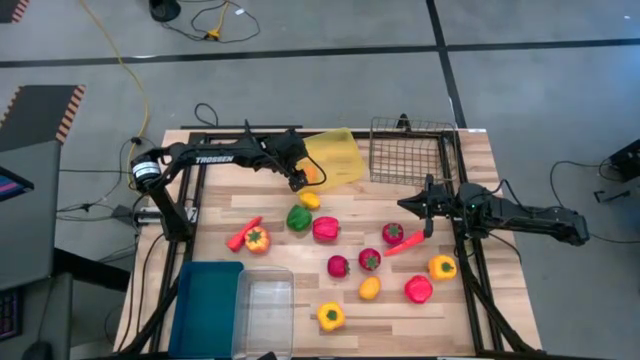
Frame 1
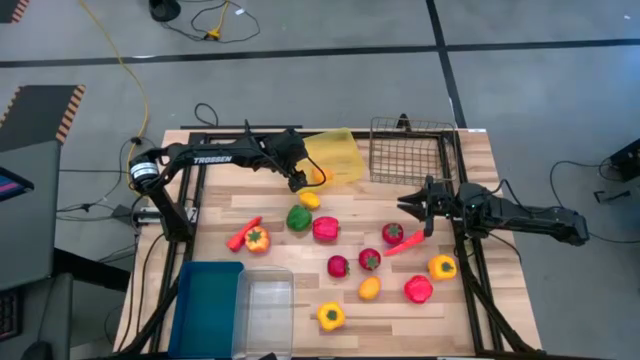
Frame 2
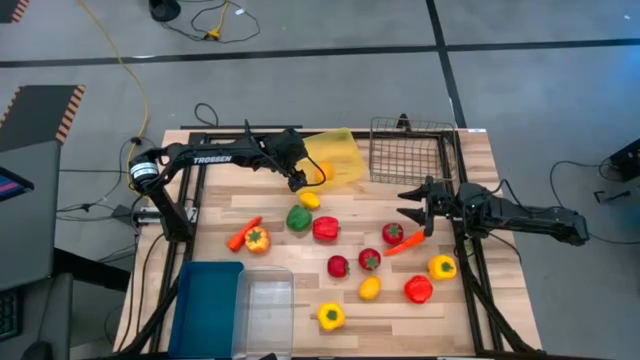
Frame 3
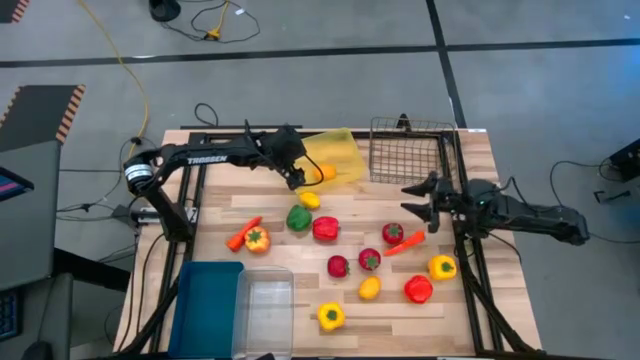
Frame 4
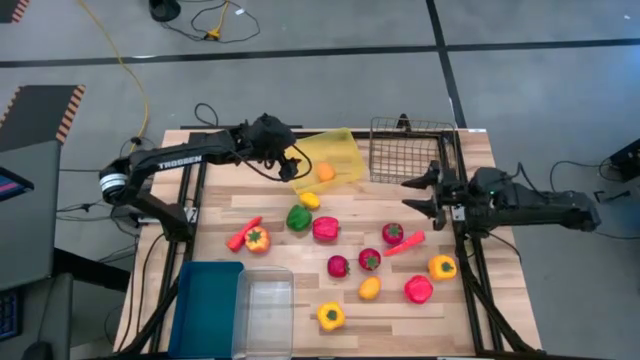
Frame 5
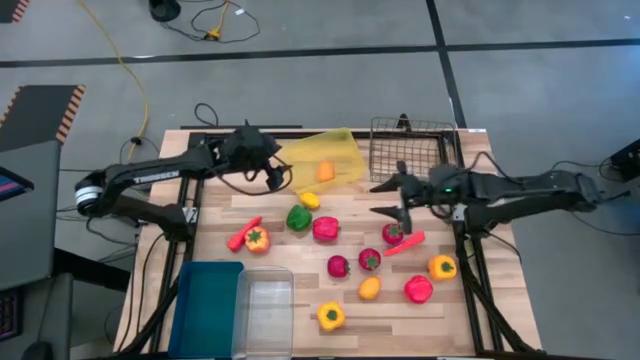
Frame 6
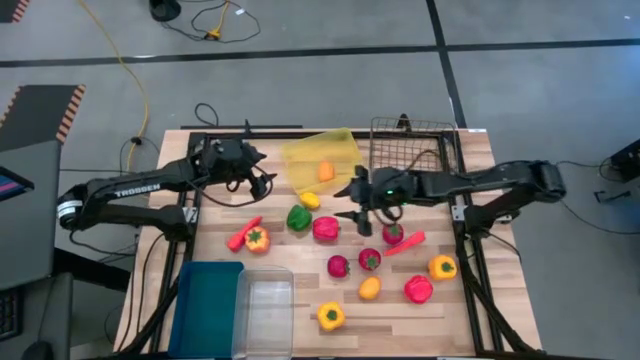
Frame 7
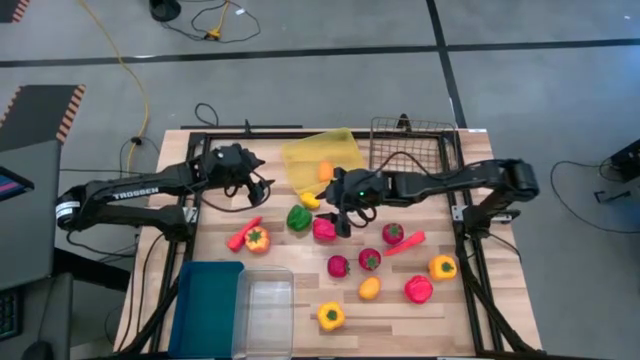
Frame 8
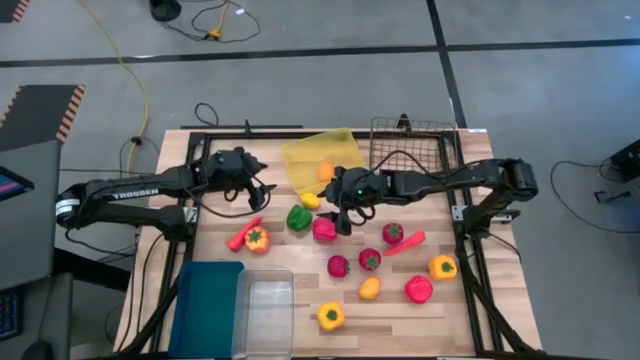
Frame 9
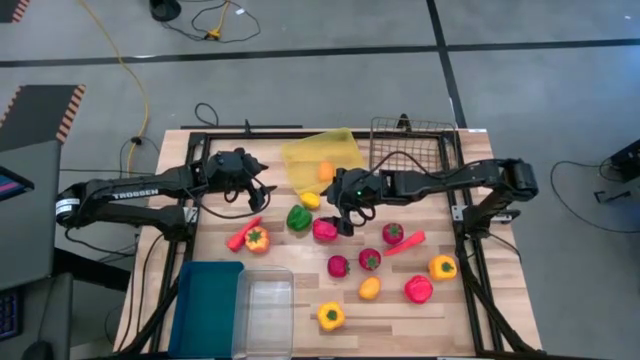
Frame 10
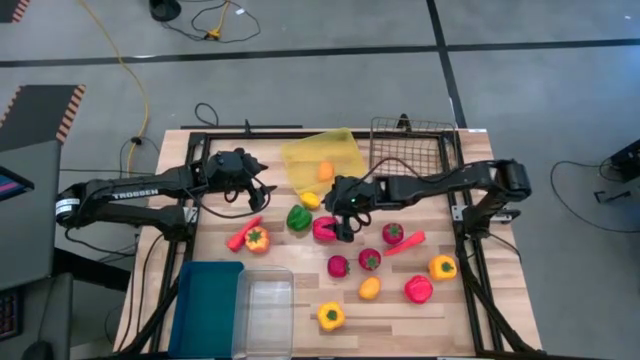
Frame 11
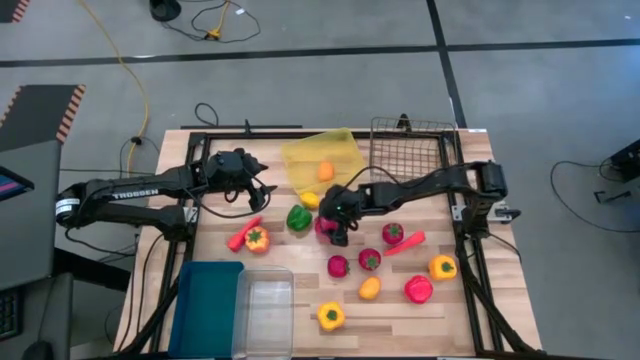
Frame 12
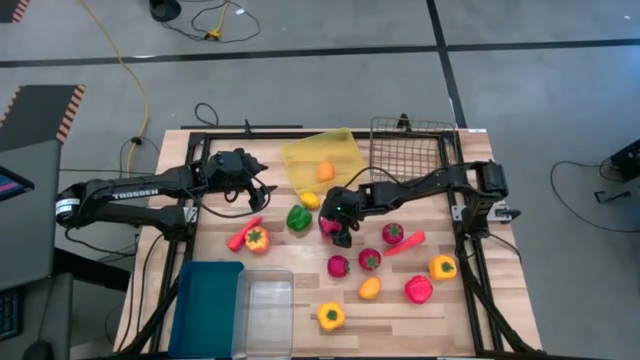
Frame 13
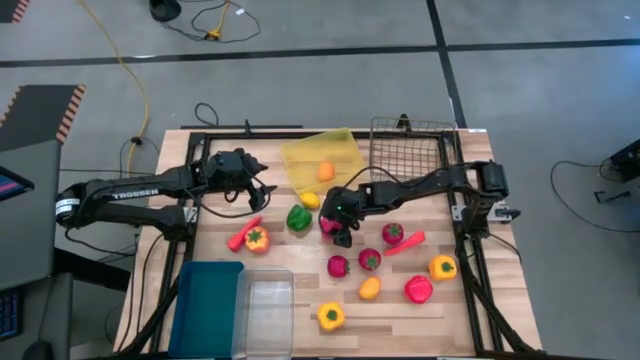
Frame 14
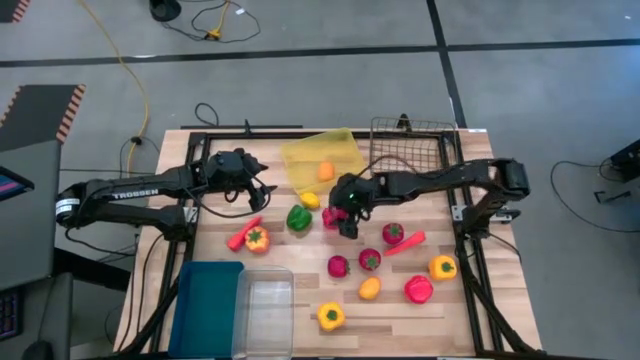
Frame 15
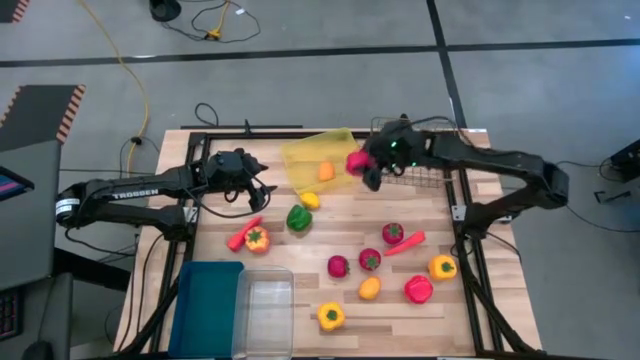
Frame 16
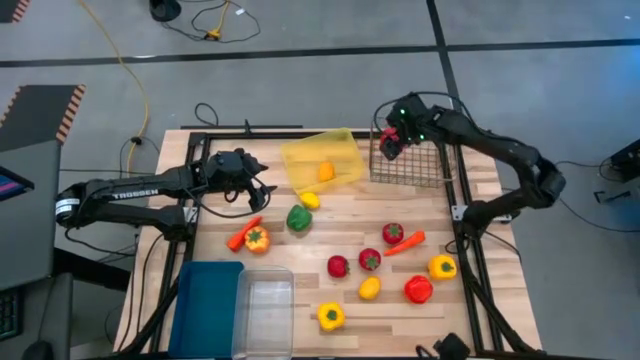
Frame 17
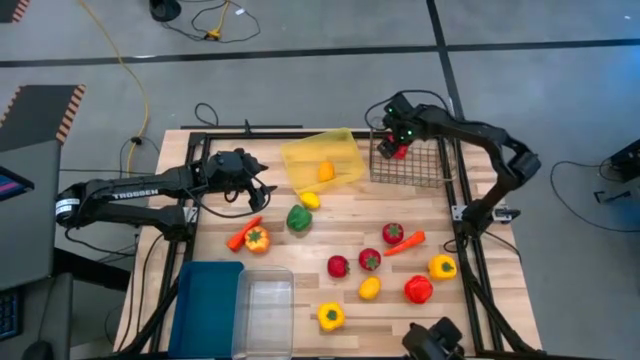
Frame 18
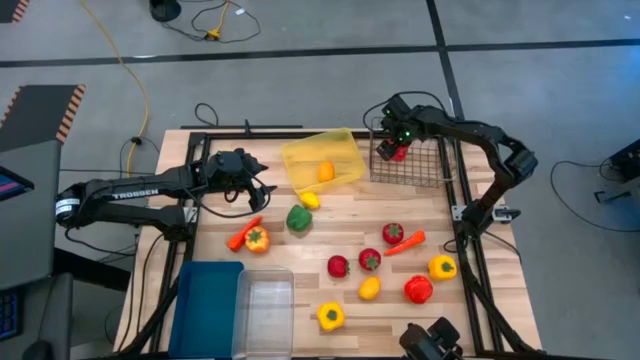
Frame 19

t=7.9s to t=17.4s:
Task: Sort produce into baskets
Put the red bell pepper into the wire basket

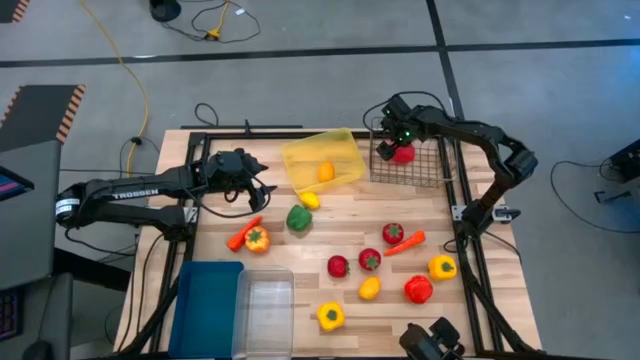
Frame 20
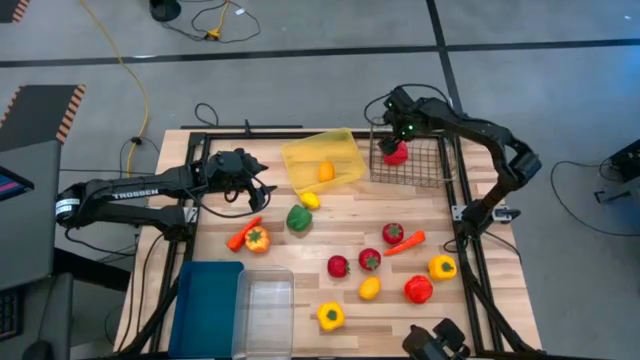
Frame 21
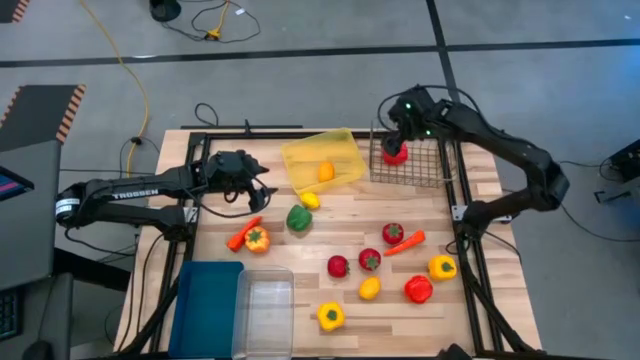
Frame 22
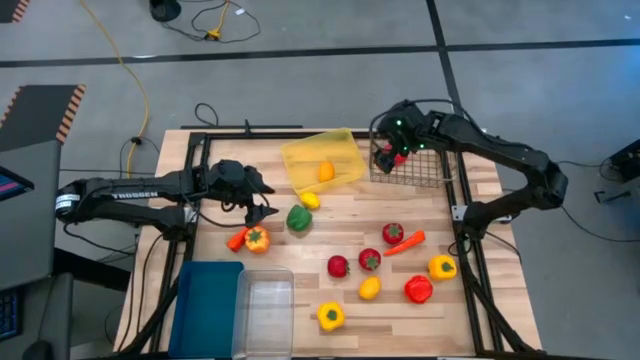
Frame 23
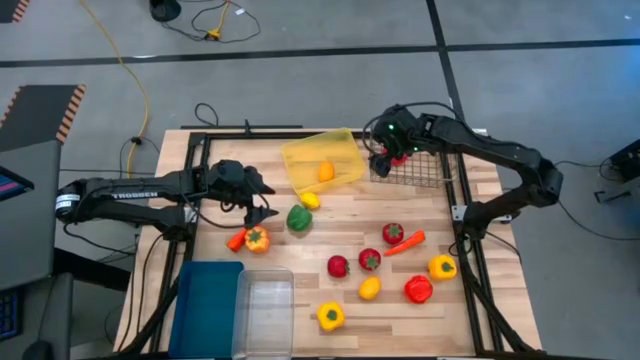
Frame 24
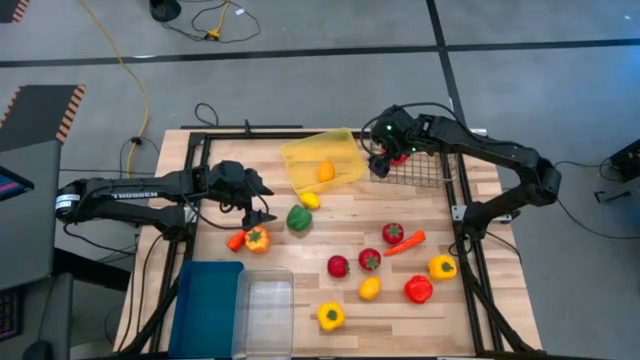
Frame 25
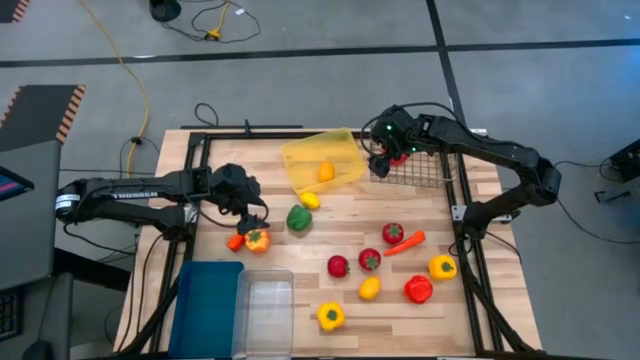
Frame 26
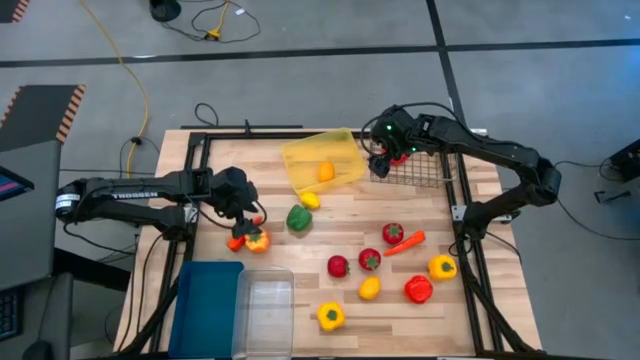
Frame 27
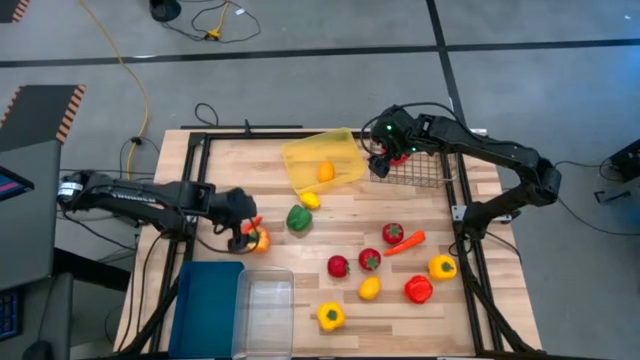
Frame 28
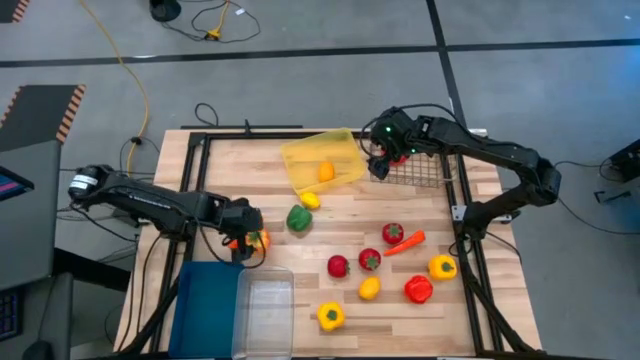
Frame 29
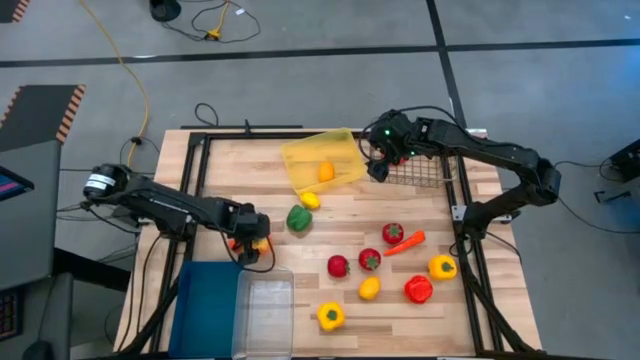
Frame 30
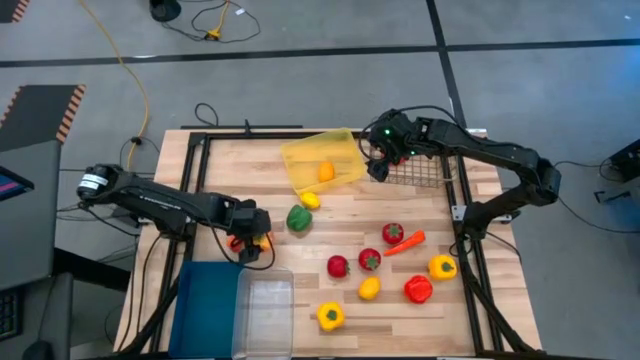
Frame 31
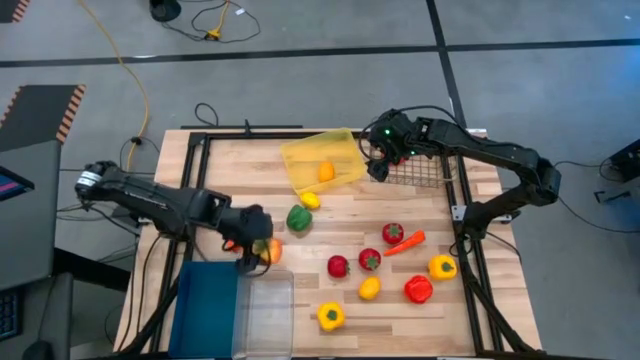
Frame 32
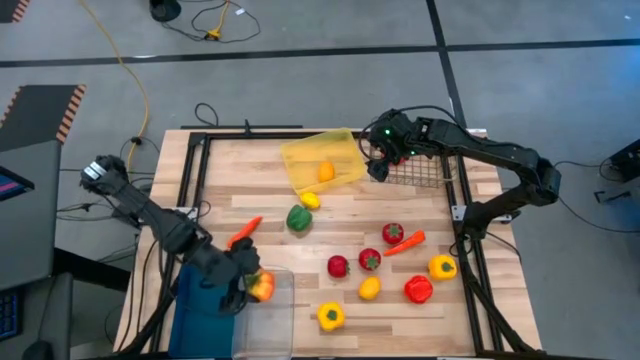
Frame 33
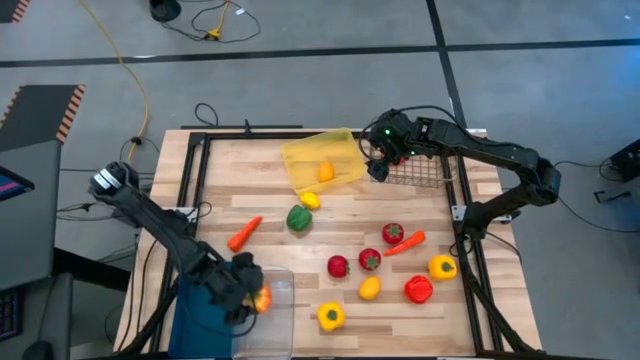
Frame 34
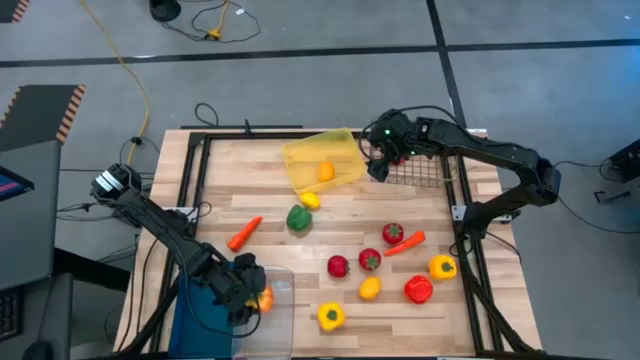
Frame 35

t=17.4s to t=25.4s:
Put the left orange tomato into the transparent bin

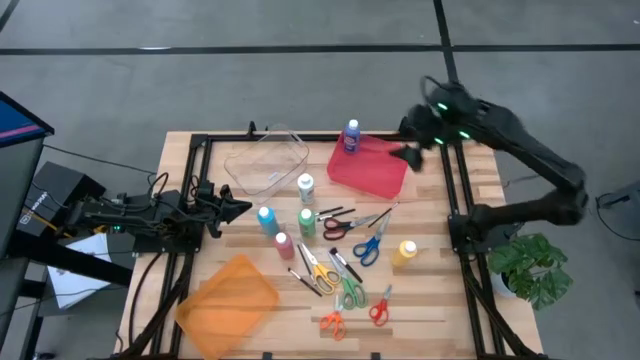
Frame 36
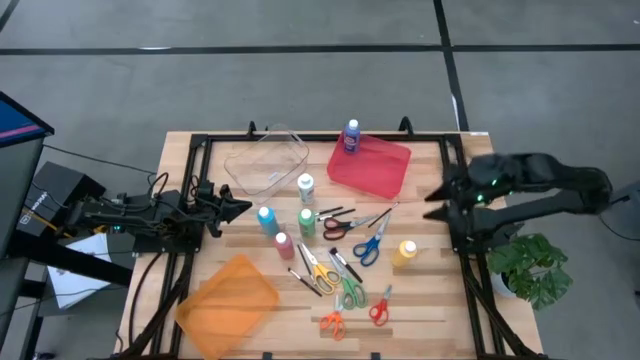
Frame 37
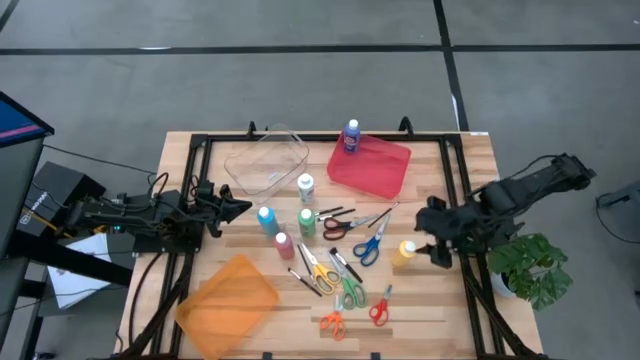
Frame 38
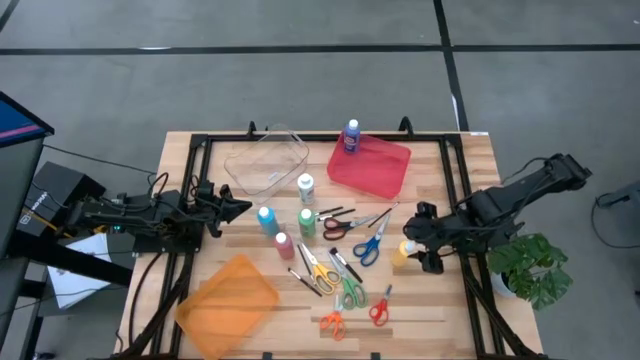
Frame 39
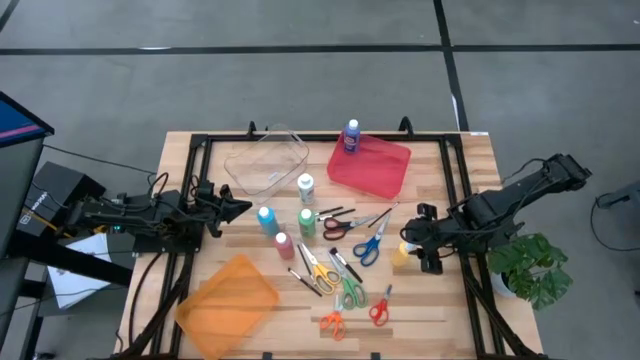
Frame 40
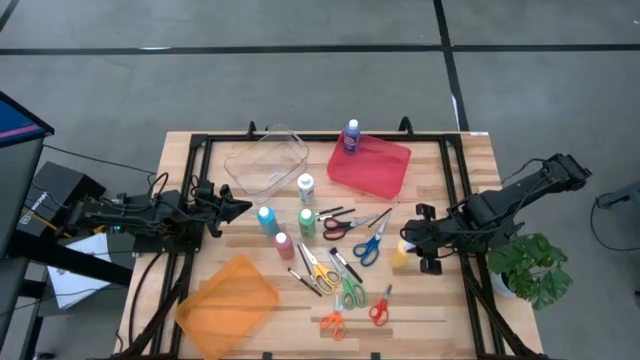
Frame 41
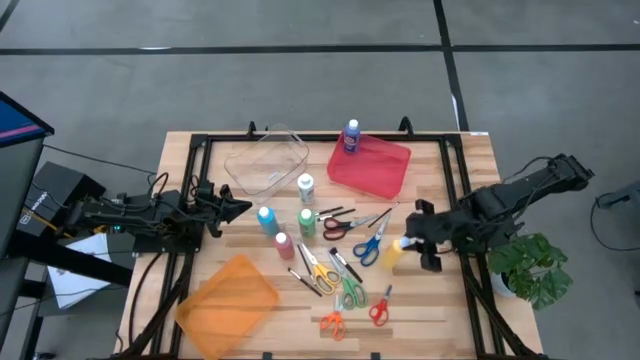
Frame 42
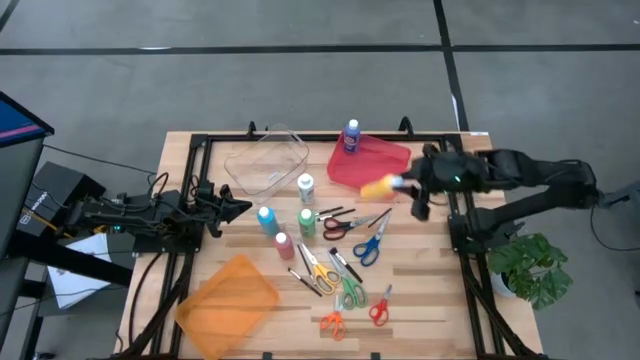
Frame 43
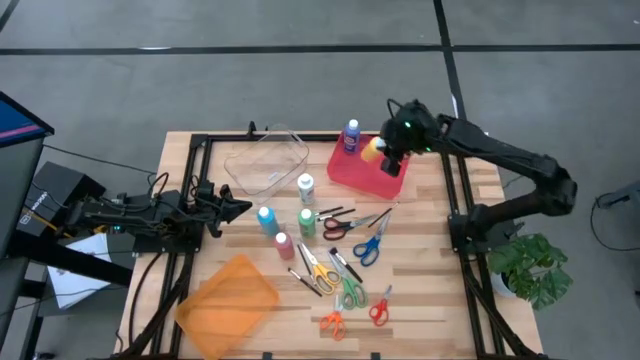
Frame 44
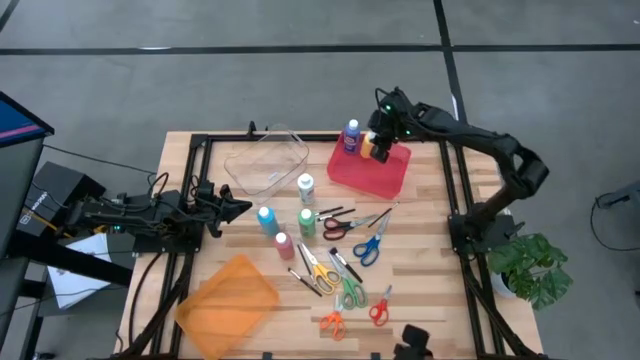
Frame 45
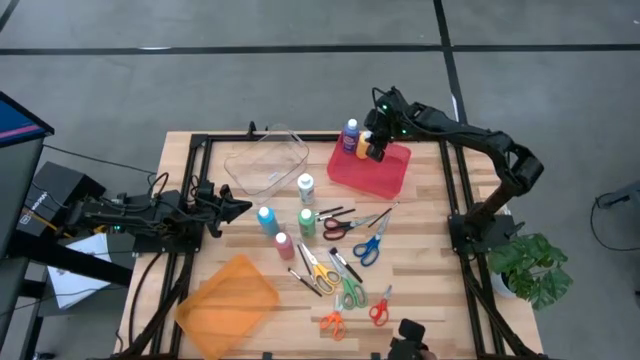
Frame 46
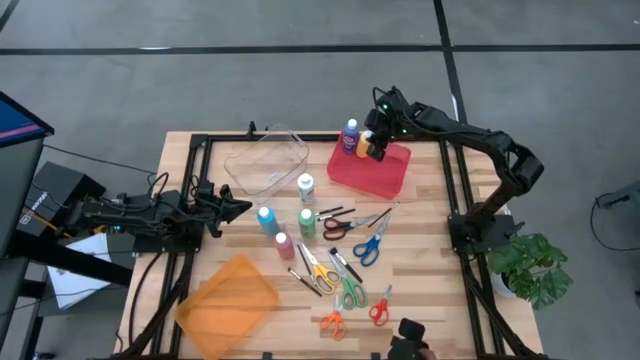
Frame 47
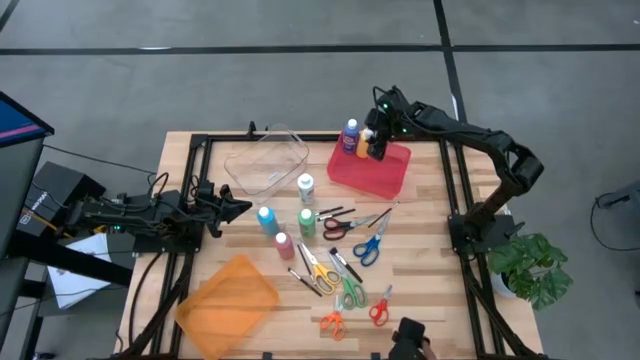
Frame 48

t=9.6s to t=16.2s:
Task: Pick & Place Paint Supplies
Put the yellow paint bottle into the red bin
